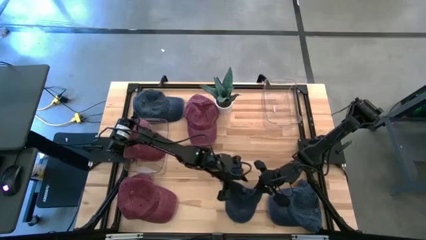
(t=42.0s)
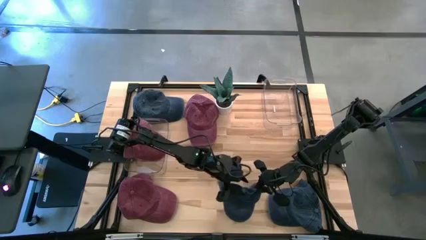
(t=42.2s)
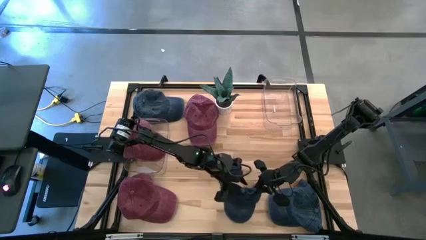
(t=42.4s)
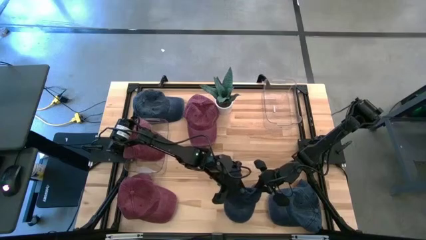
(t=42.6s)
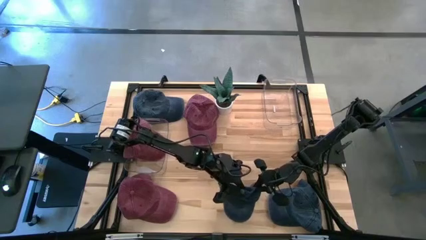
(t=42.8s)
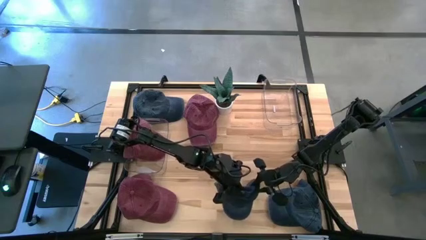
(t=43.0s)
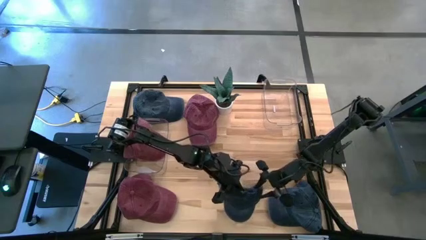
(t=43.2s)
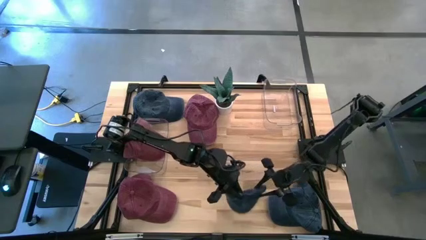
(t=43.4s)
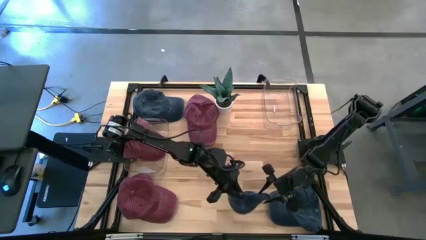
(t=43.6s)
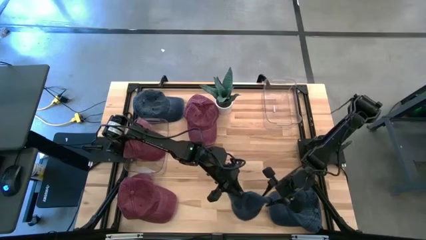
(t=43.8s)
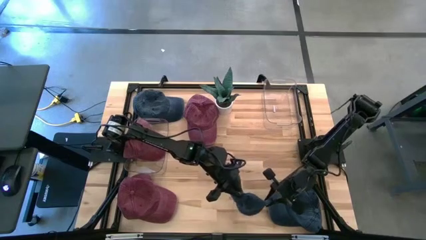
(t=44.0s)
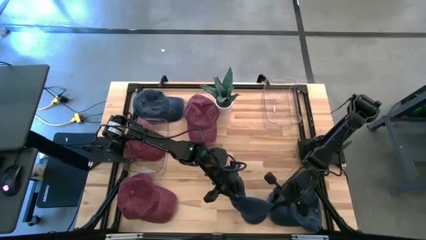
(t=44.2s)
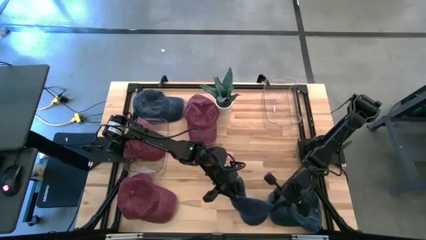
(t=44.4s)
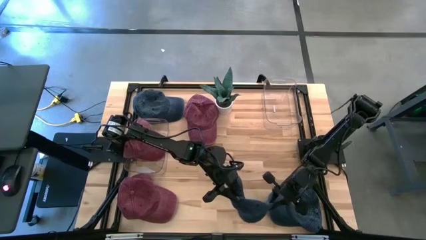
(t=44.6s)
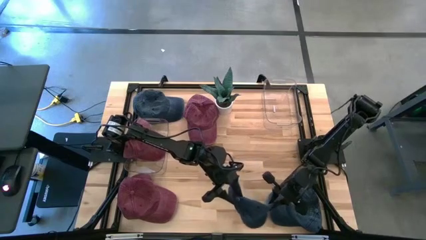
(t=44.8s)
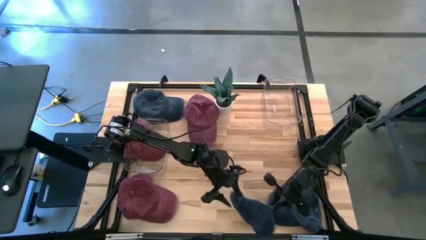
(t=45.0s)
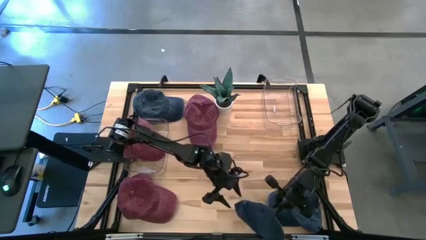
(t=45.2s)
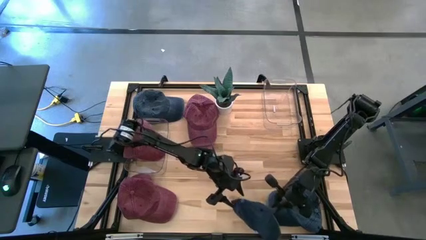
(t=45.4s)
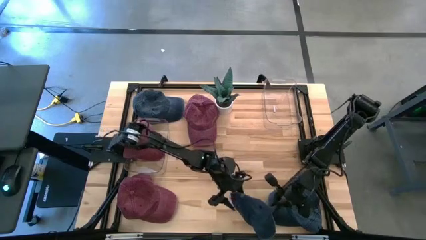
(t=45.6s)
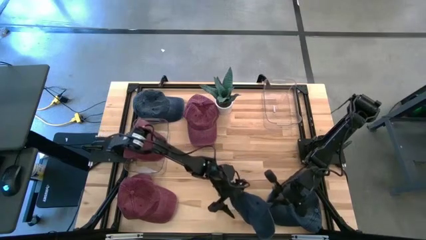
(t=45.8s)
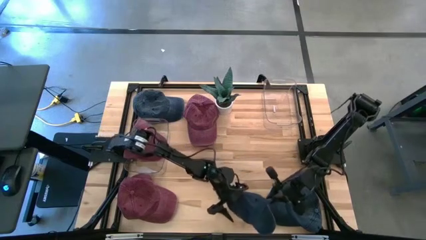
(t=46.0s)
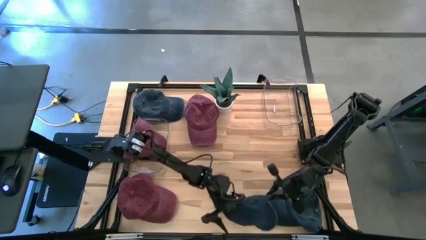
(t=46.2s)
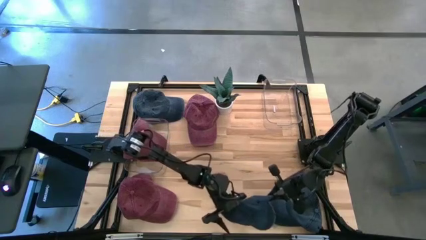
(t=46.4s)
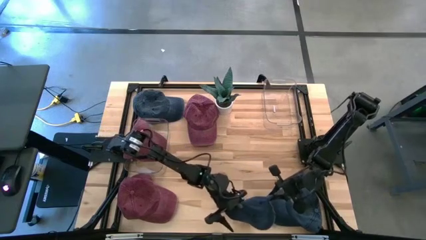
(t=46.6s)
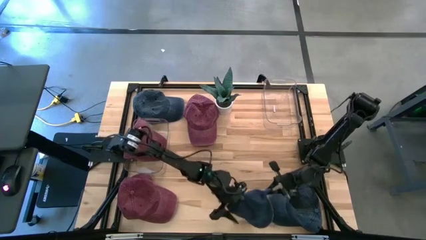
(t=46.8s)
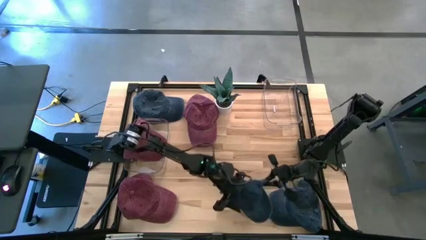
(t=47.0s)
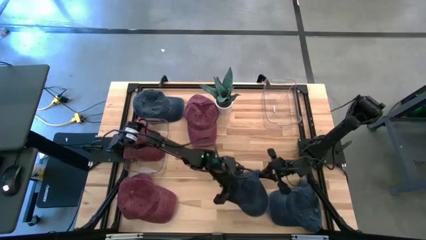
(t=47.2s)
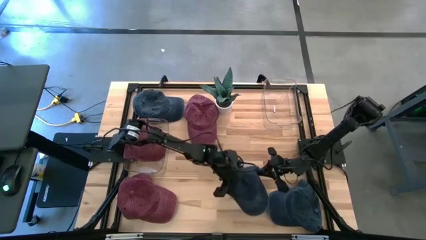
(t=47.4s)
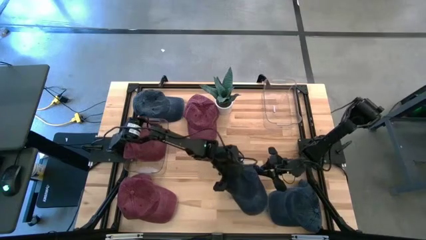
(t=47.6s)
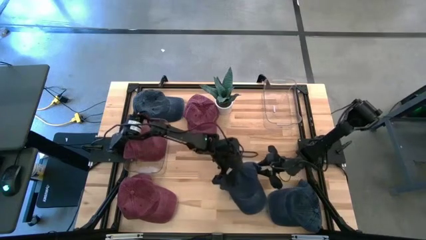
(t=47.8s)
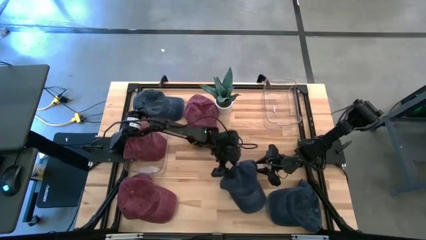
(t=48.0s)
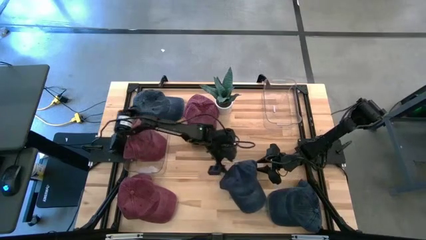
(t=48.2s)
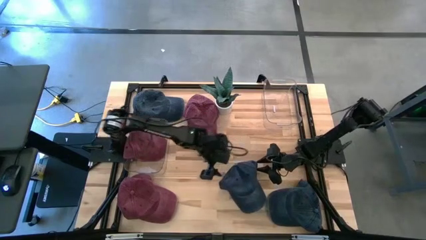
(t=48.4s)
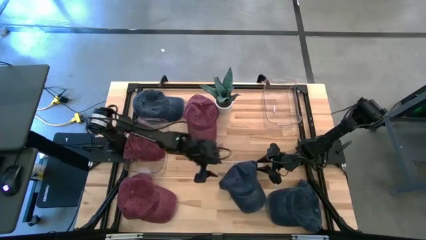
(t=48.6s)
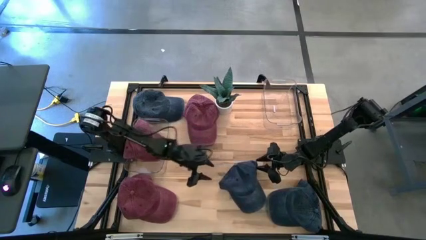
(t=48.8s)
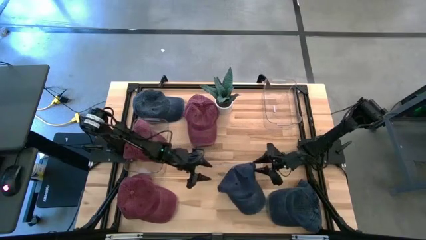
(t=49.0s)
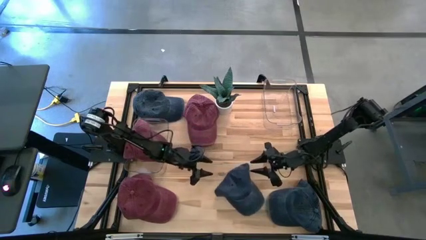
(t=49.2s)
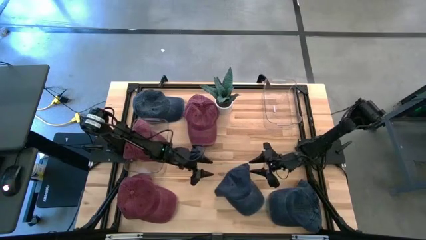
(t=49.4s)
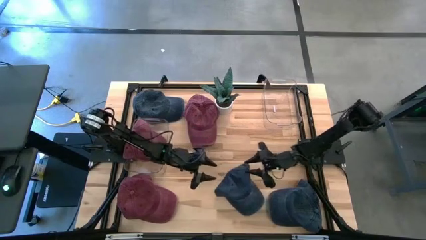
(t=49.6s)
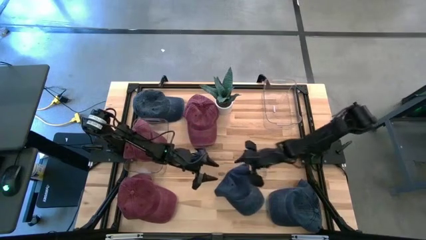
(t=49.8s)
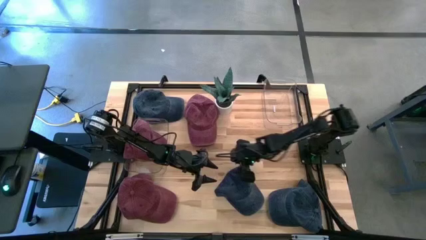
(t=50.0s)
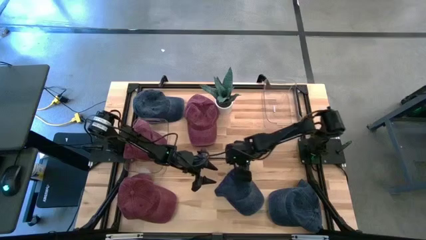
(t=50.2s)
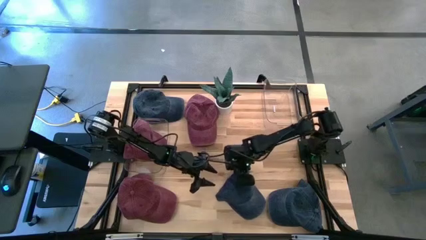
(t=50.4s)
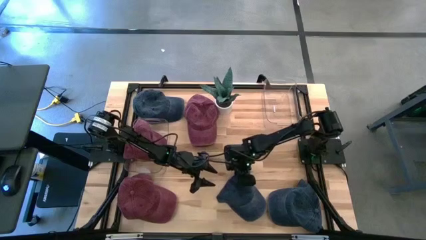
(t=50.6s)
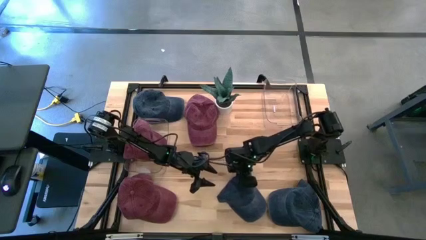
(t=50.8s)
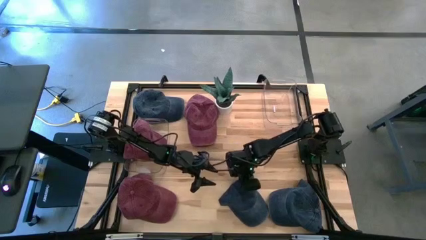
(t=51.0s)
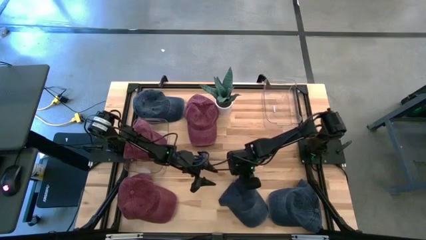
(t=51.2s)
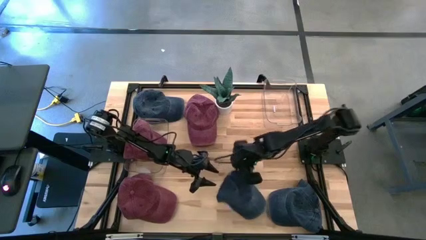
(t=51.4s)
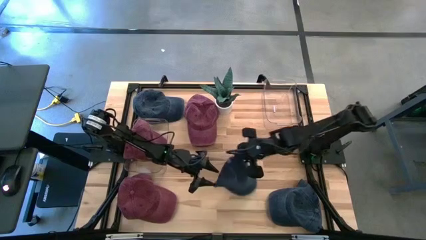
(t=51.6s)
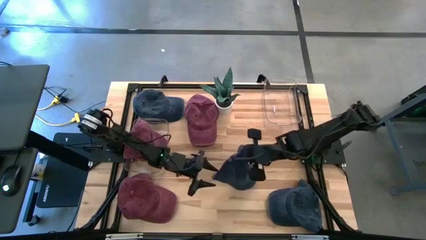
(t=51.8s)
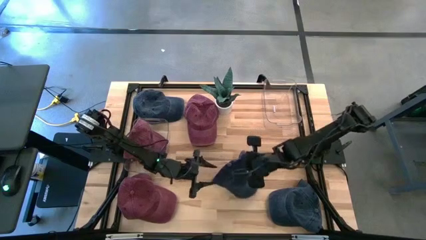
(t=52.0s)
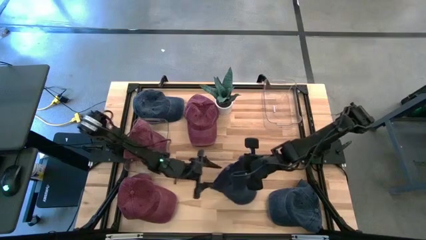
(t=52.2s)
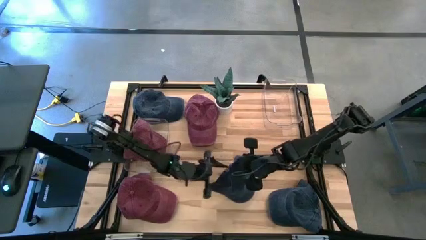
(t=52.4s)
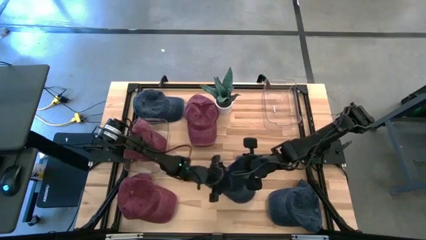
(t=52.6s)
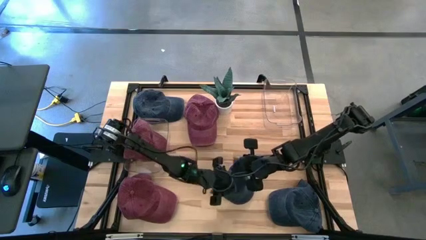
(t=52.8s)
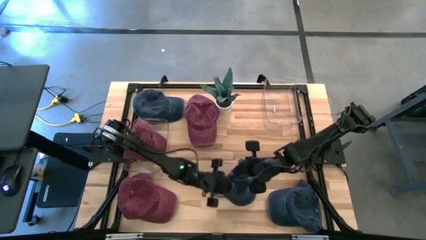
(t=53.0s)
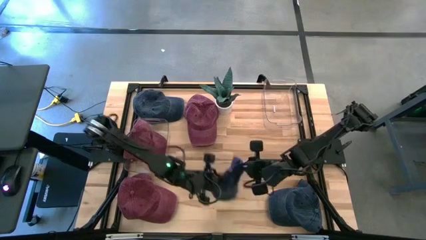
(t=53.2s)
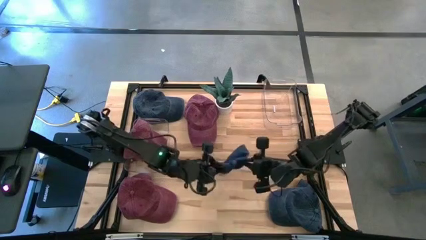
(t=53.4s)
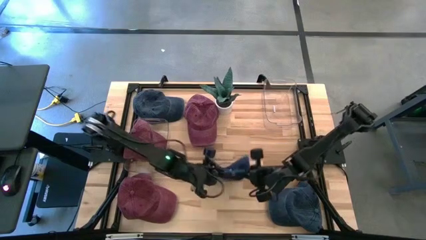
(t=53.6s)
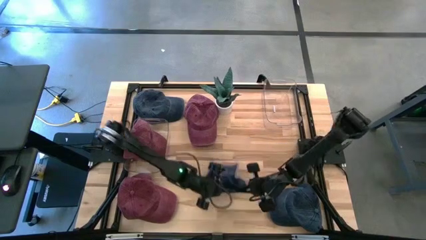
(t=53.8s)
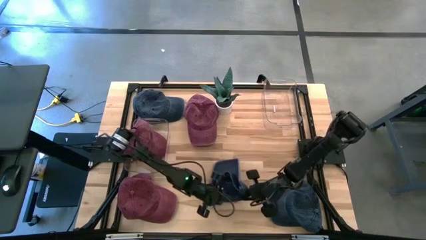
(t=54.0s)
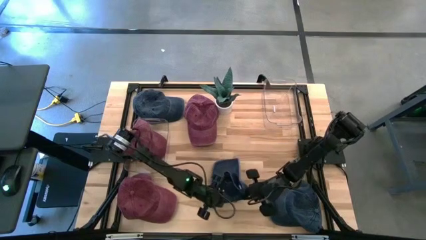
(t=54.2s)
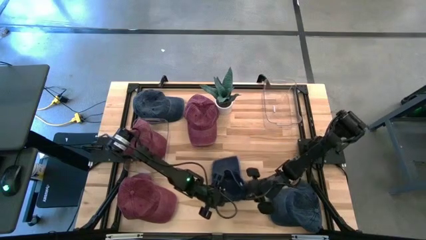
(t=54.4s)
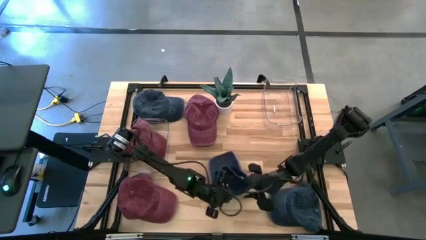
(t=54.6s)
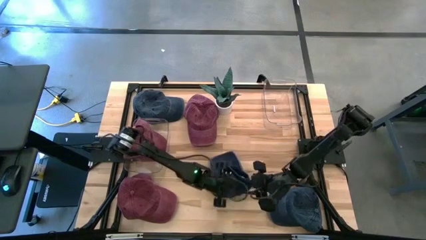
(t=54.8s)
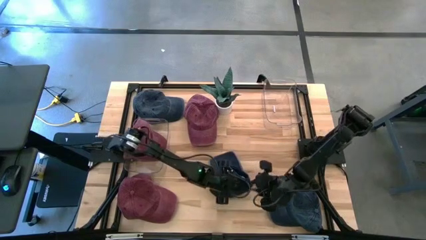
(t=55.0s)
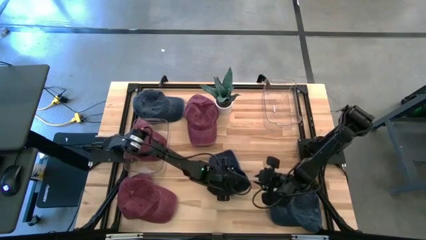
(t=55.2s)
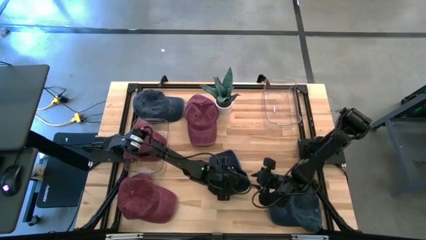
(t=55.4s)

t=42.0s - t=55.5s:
Task: Pick & Place hat
Put the middle blue cap into the right transparent bin
